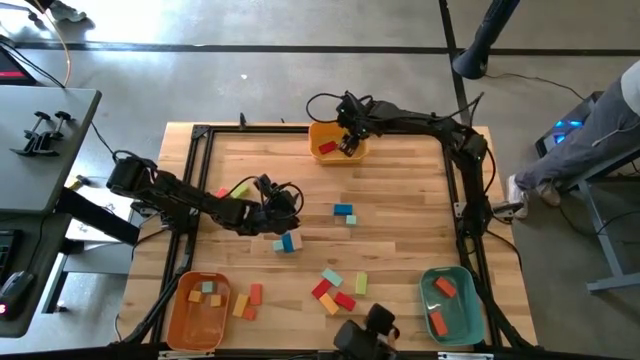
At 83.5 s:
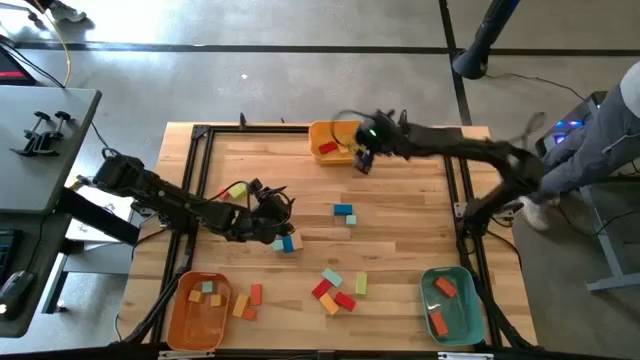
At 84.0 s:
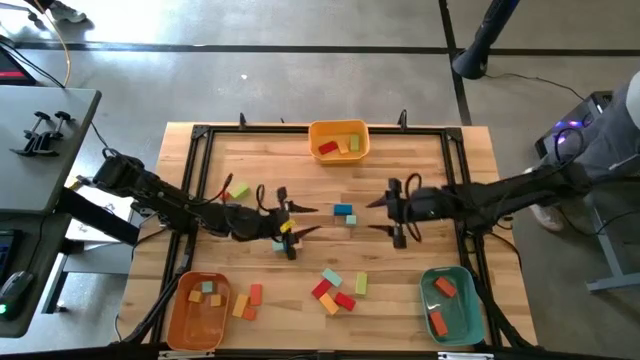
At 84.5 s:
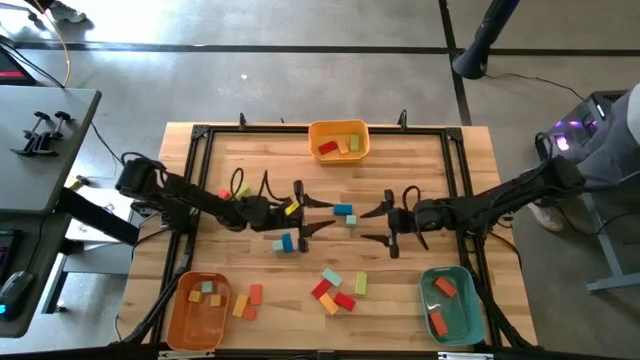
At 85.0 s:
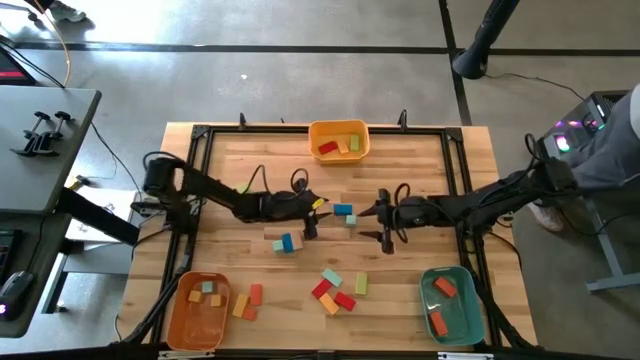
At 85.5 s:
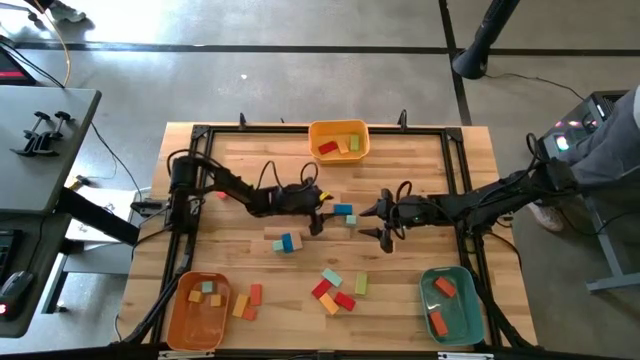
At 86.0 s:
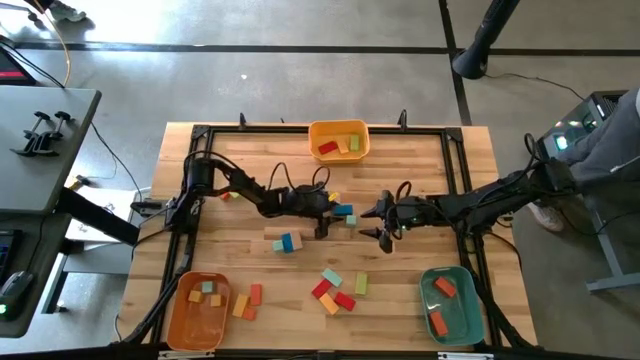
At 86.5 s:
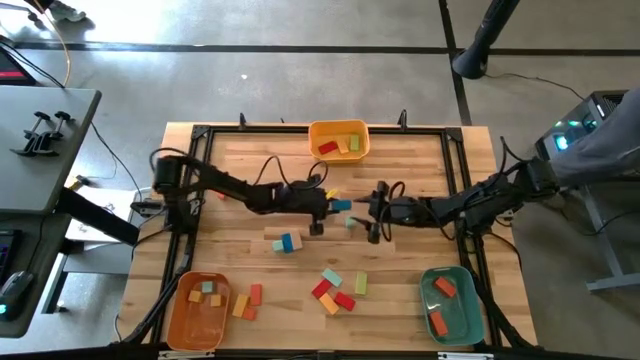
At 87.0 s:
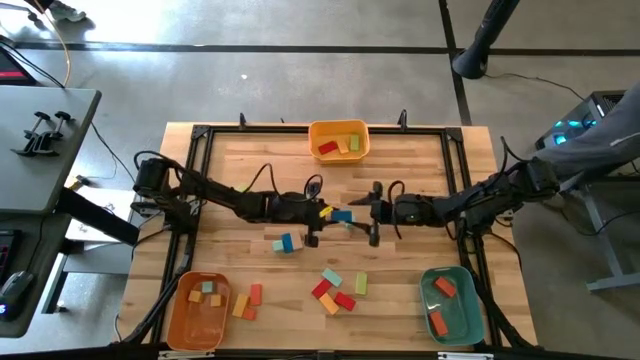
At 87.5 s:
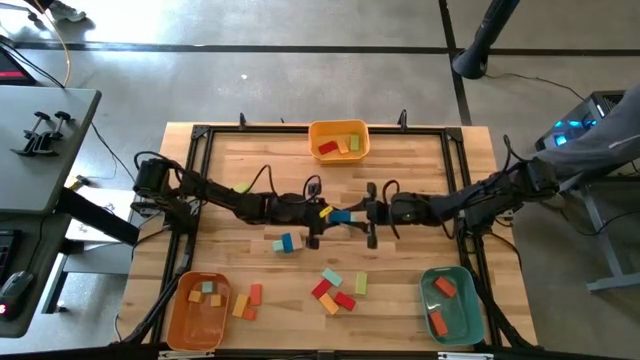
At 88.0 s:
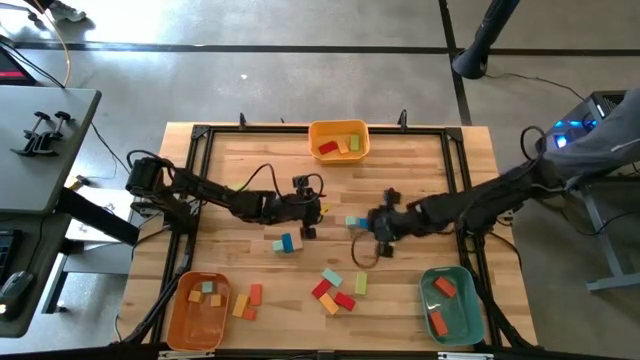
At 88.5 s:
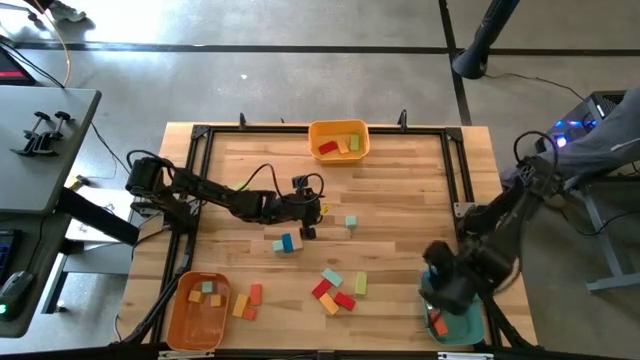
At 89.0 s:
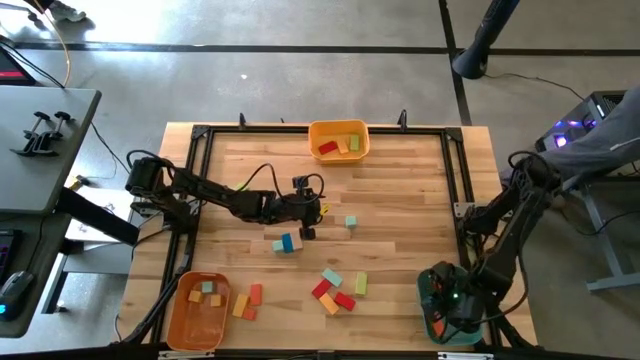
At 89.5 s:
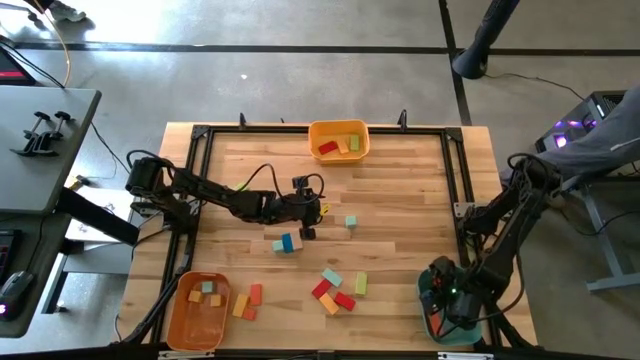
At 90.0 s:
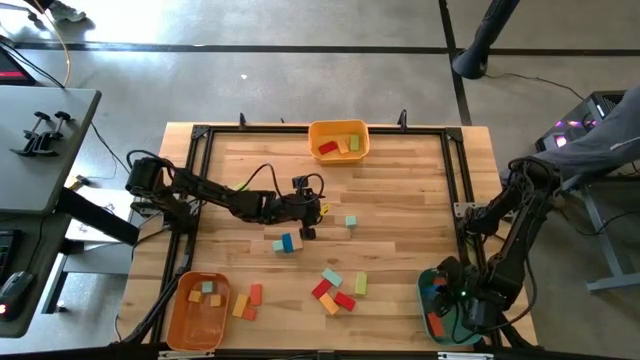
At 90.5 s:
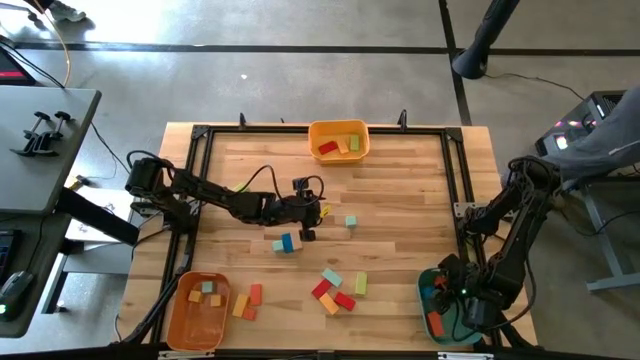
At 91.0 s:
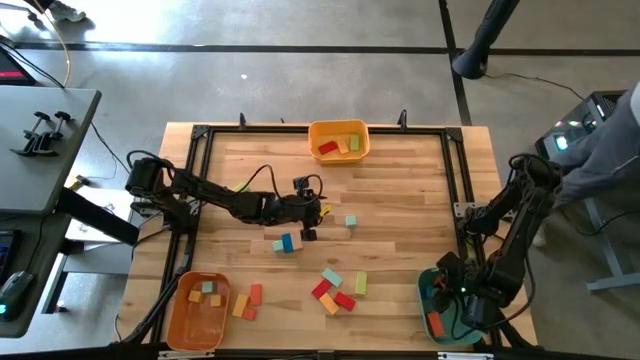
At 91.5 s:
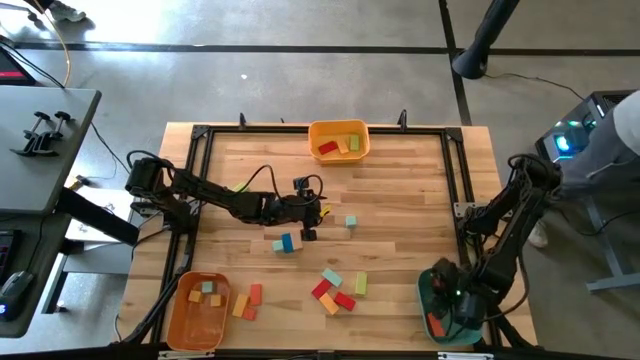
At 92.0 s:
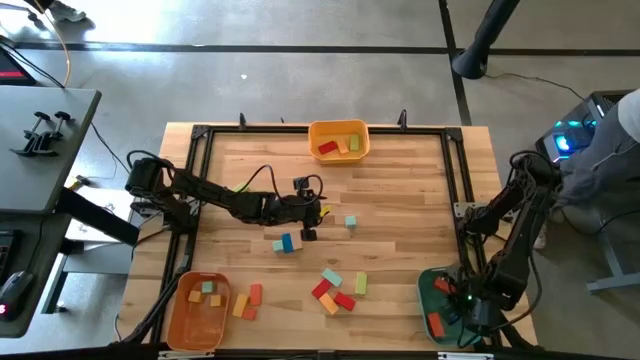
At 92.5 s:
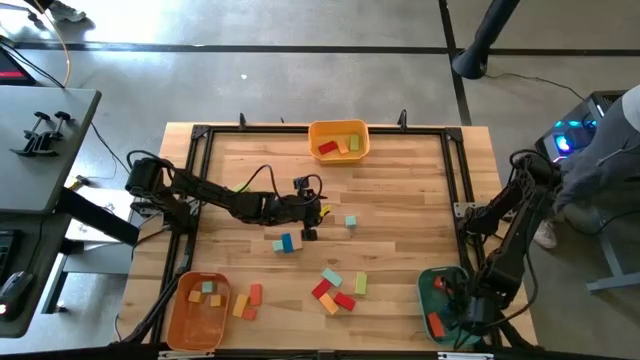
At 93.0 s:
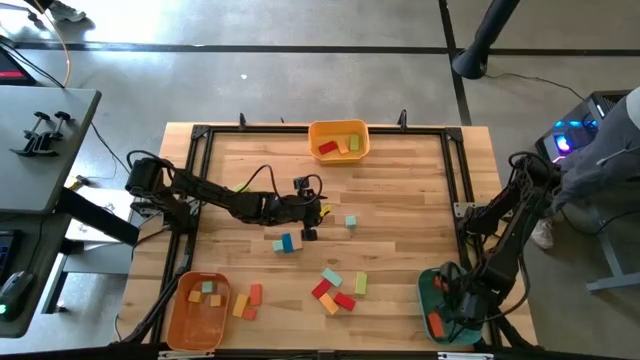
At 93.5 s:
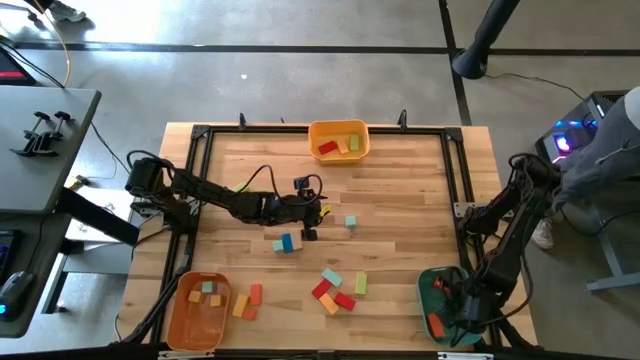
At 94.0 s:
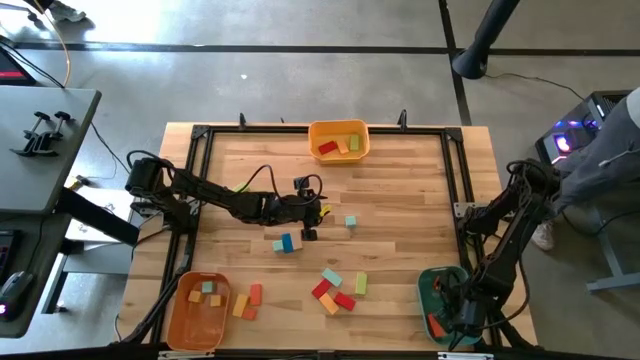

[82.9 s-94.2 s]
Task: Sort blocks by size
Put the large blue rectangle block into the green bin

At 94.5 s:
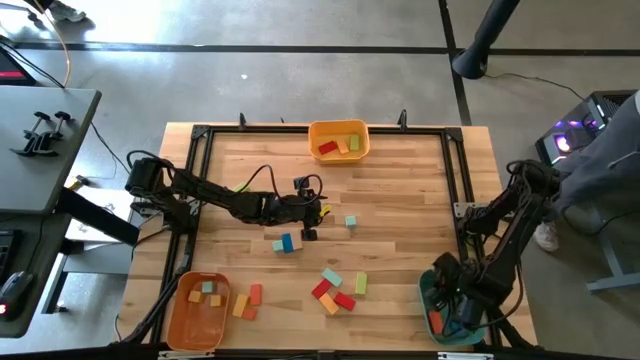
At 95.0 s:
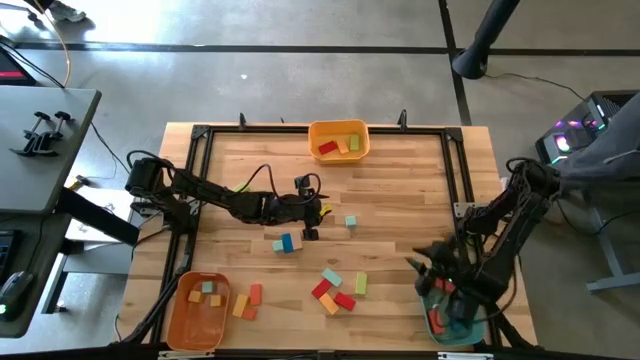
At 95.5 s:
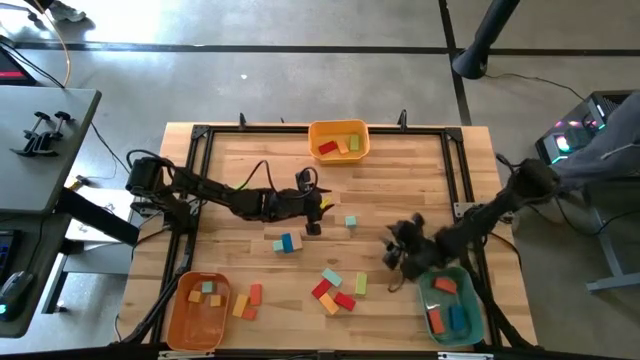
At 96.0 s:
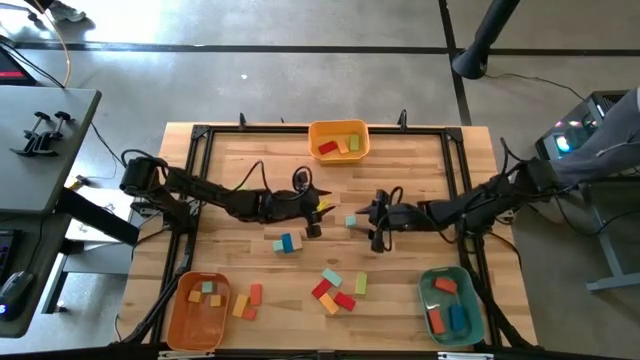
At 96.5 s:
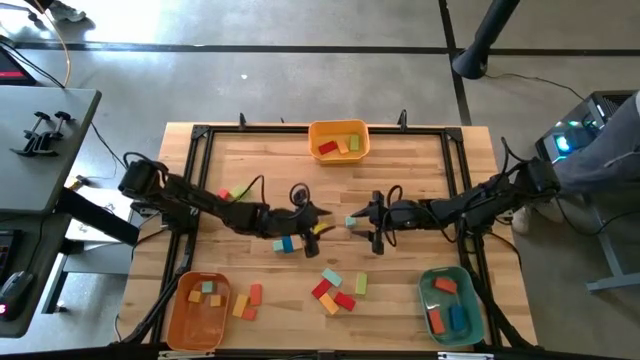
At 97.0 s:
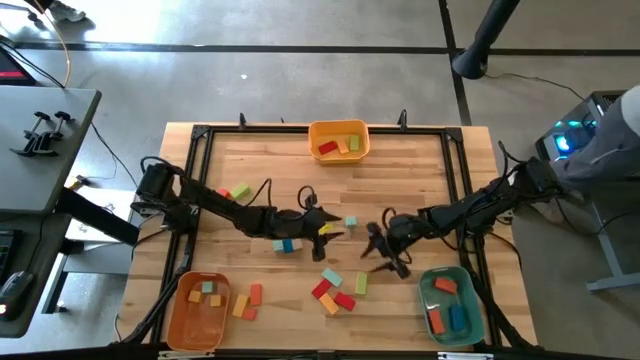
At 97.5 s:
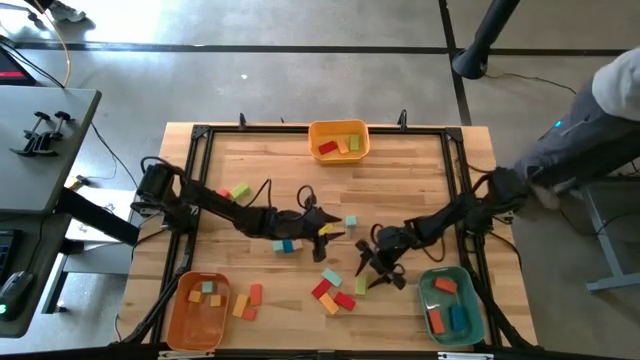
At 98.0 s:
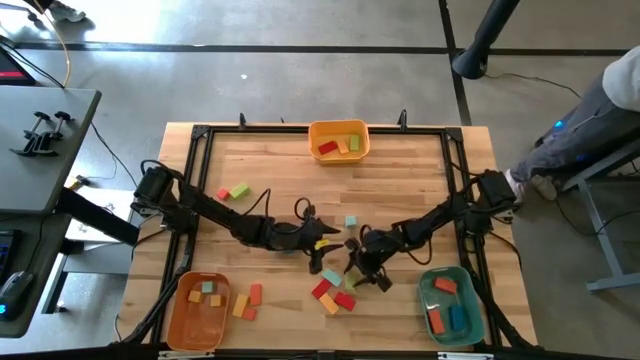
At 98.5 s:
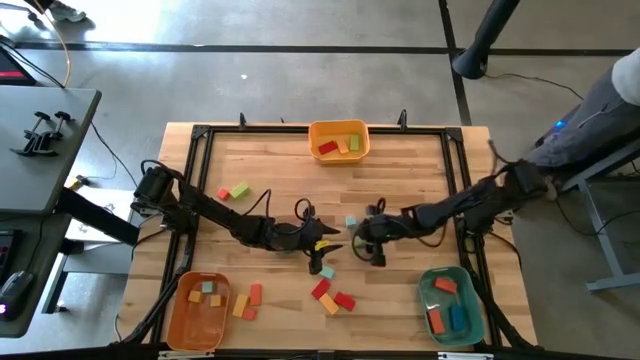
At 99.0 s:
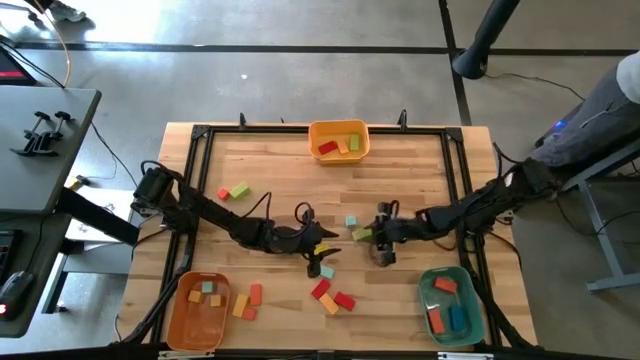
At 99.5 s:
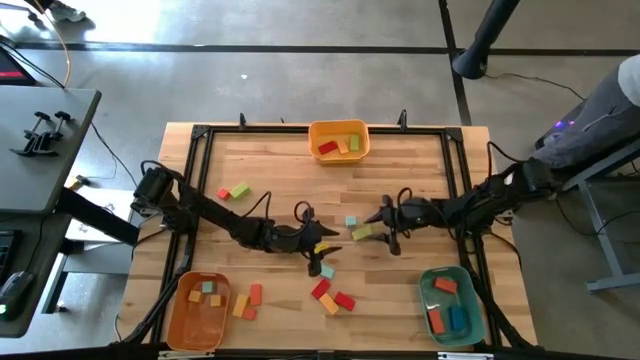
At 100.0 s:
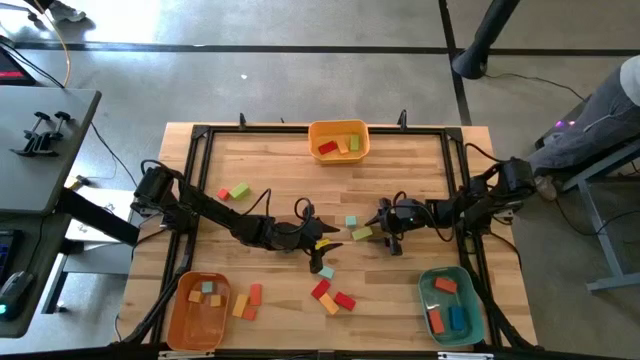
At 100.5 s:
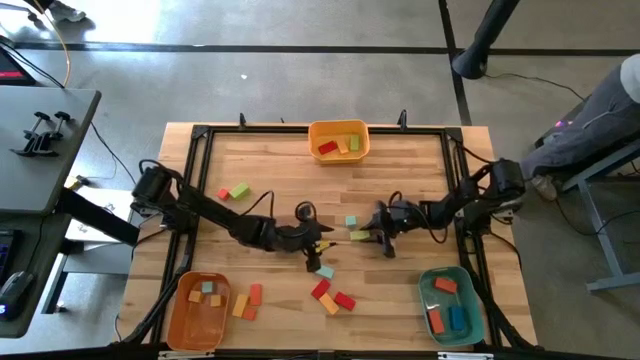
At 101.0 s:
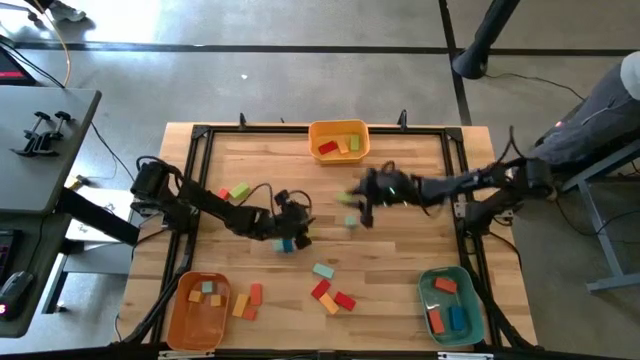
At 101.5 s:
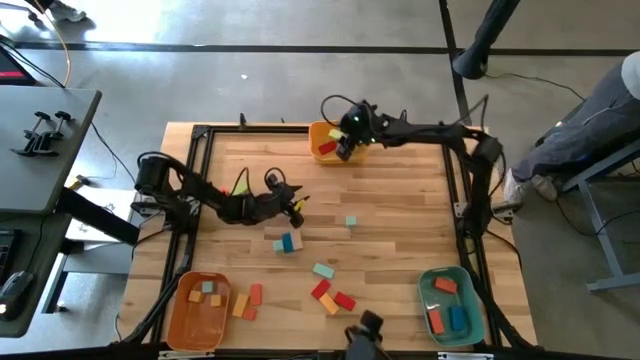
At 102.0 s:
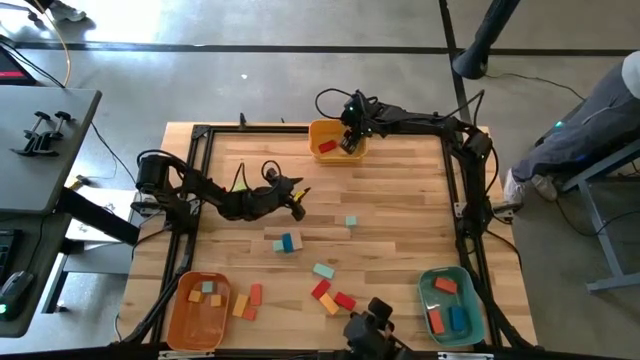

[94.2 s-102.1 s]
Put the small green rectangle block into the yellow bin

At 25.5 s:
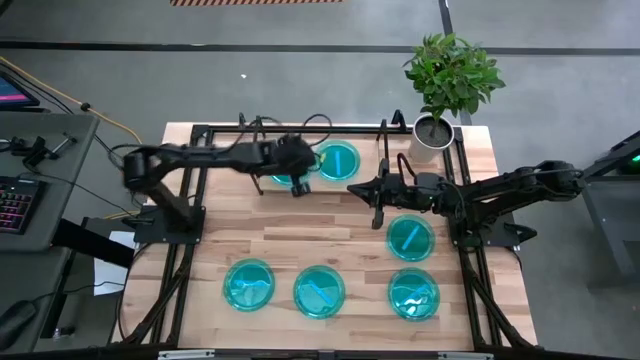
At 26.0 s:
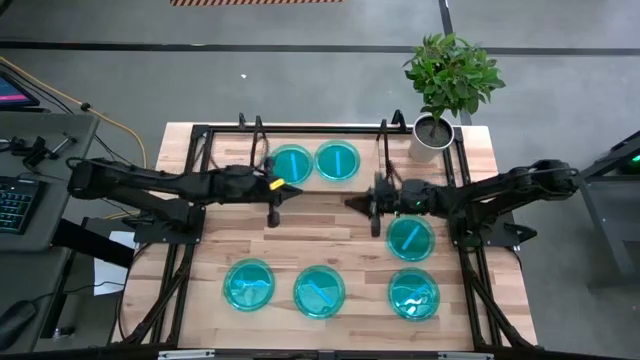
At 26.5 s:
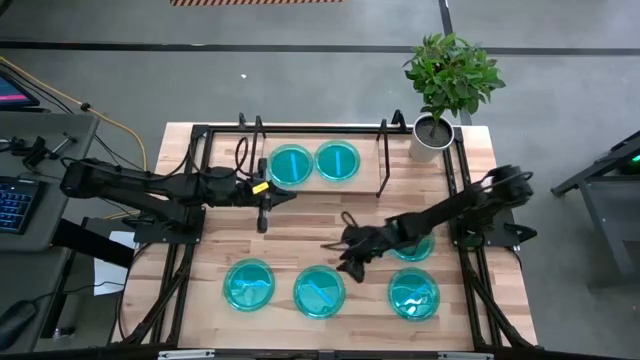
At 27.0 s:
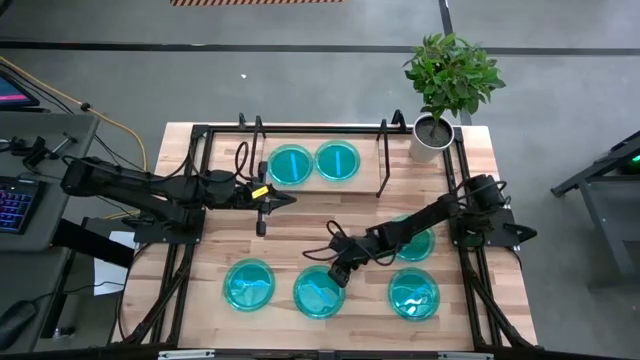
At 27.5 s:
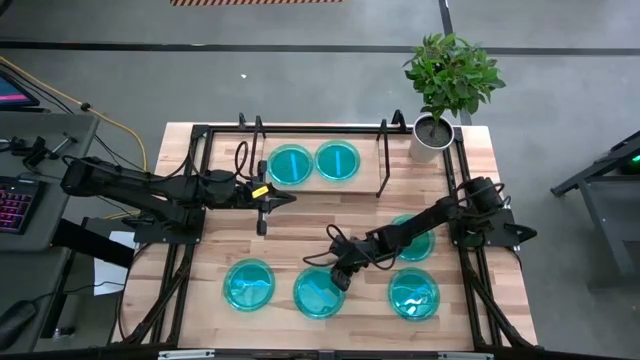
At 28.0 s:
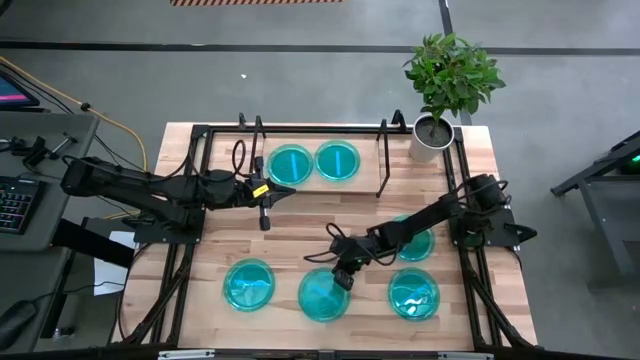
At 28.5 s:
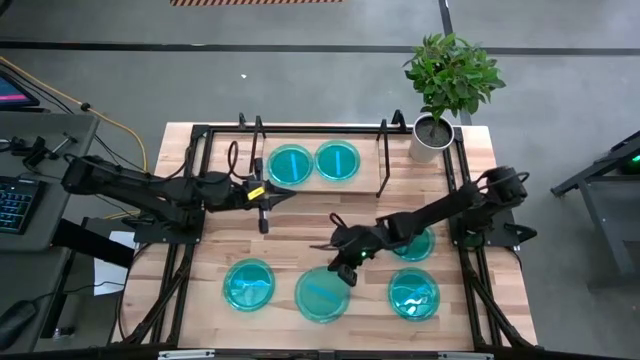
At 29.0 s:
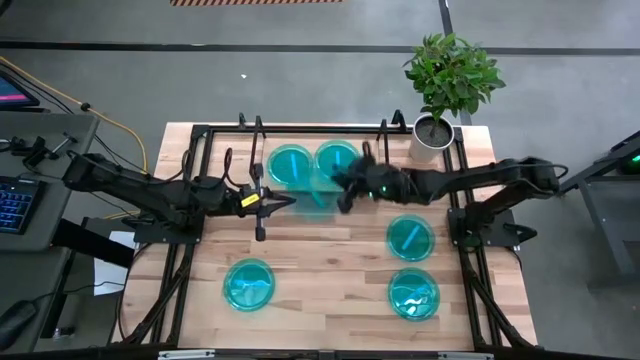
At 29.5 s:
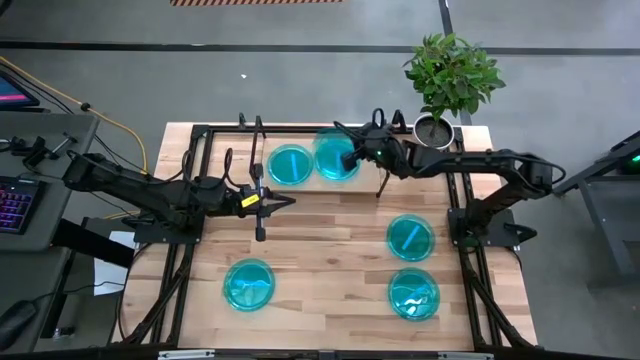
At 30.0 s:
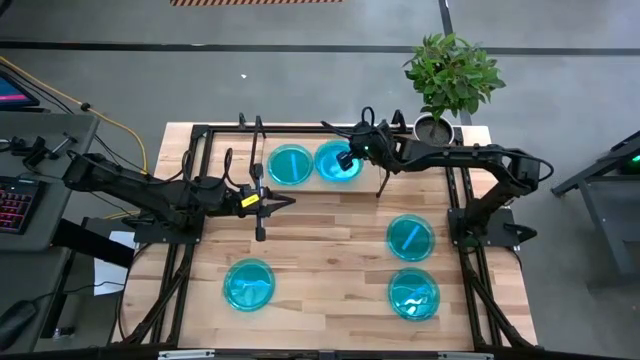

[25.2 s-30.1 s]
Task: Place and stack plates onto a shelf
Stack the blue plate on top of the blue plate on the shelf
